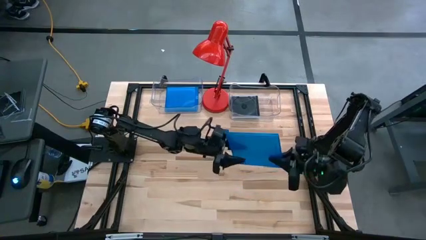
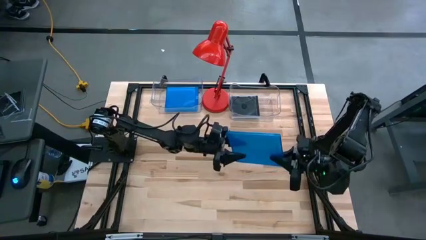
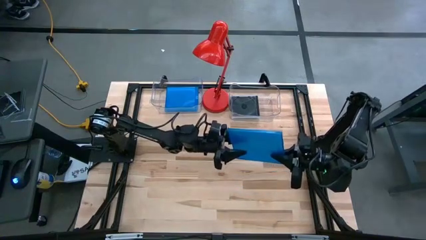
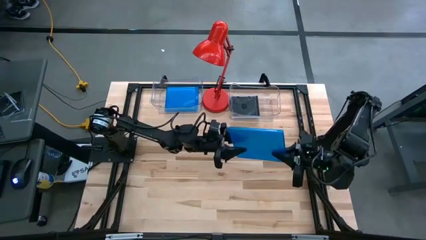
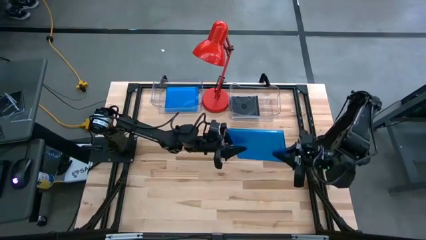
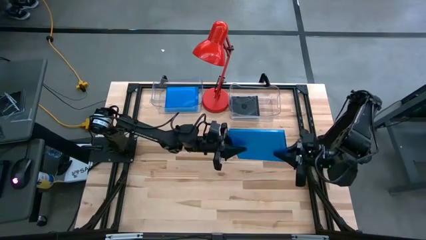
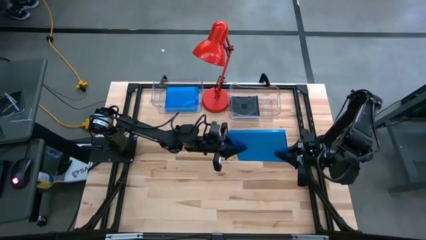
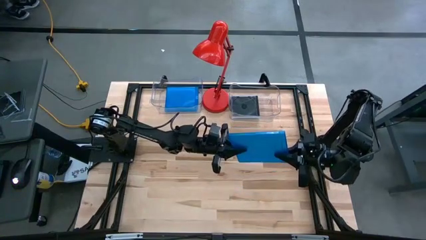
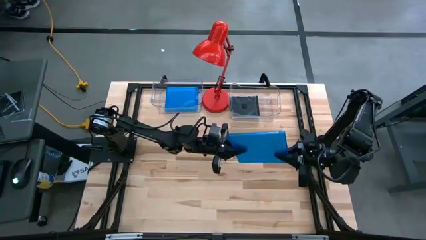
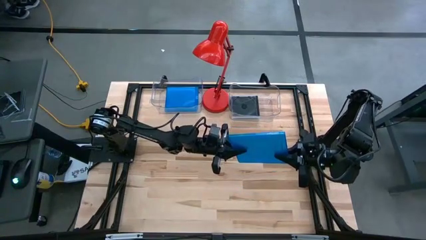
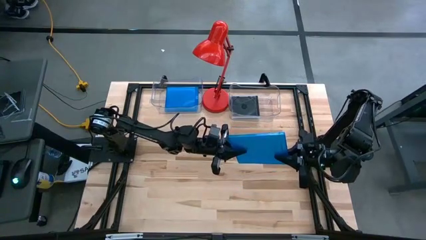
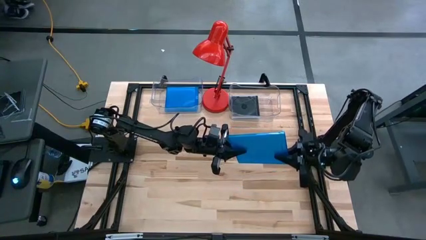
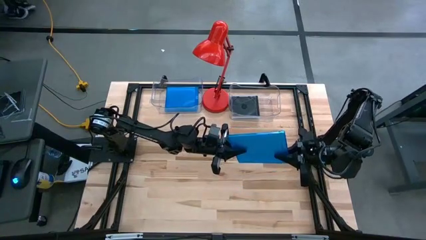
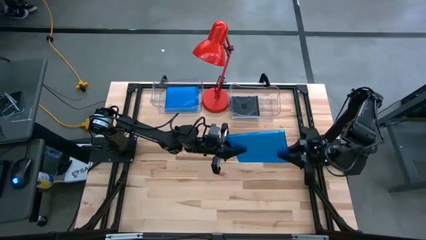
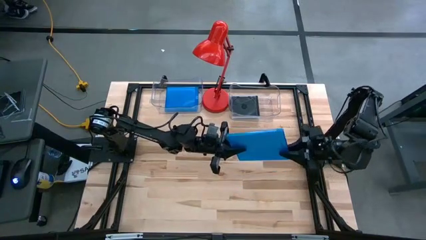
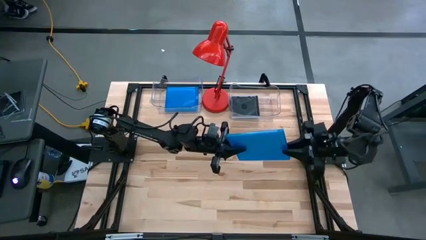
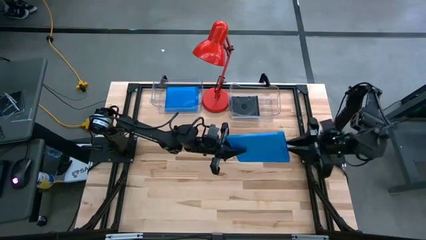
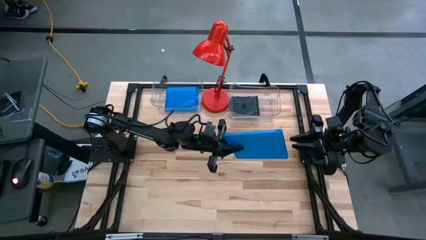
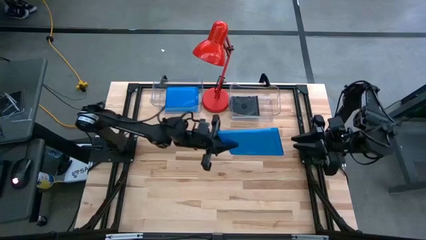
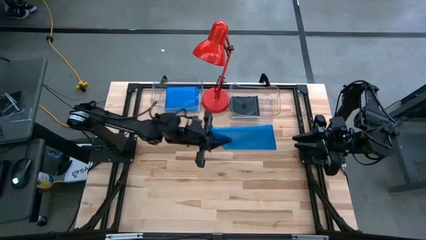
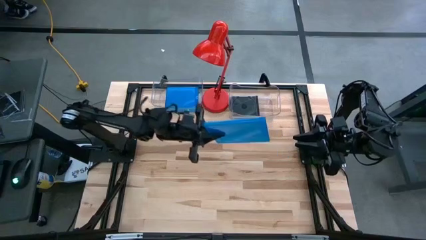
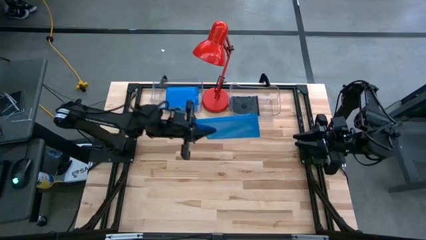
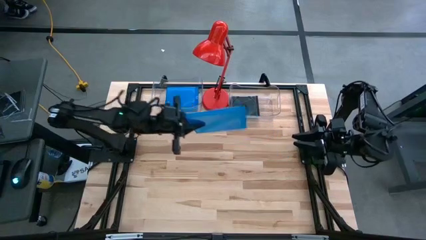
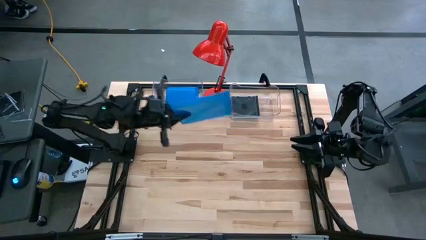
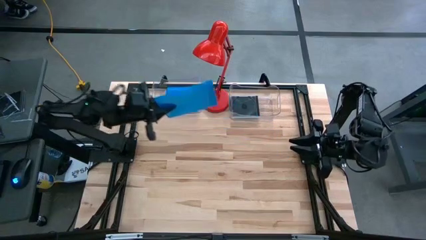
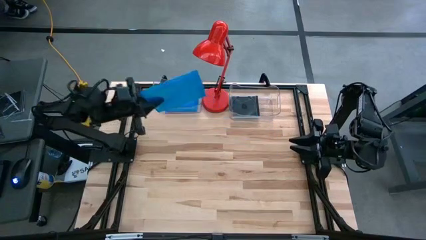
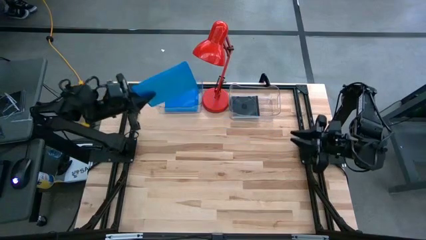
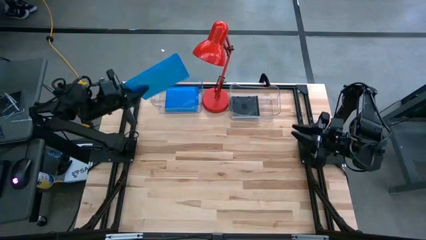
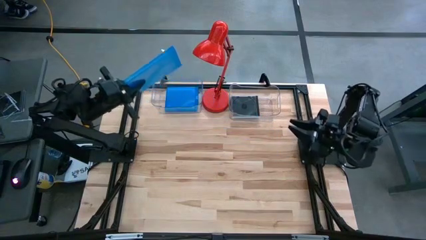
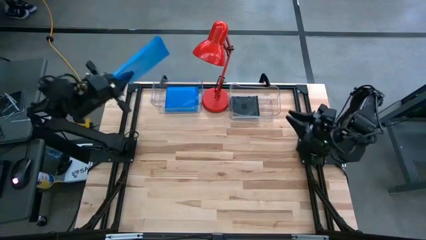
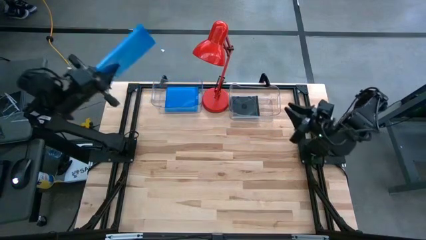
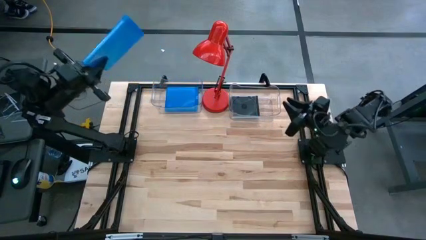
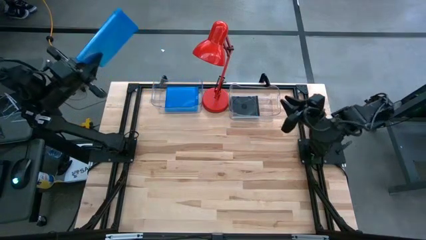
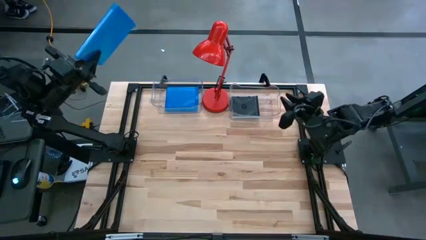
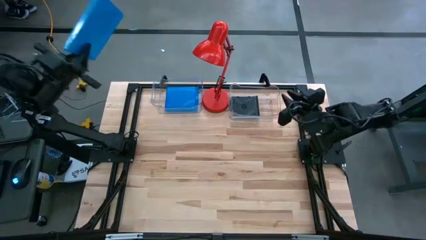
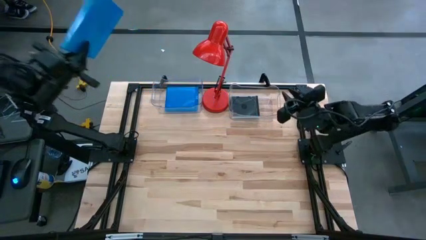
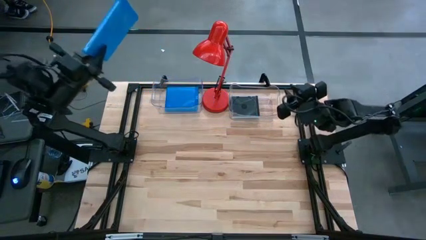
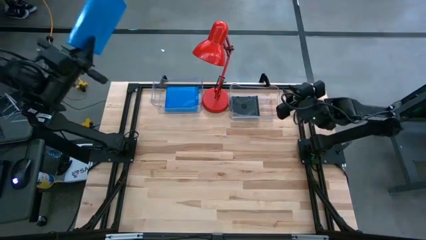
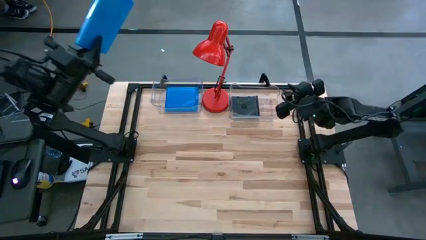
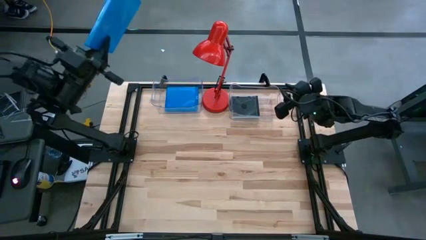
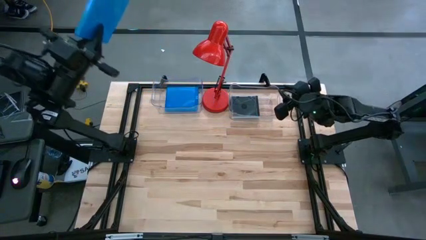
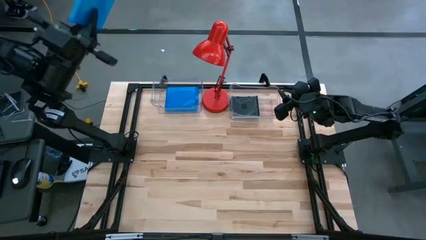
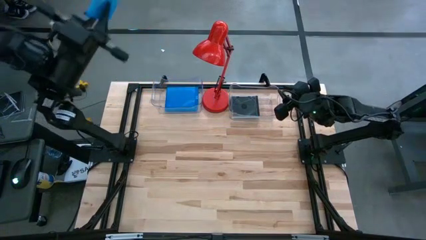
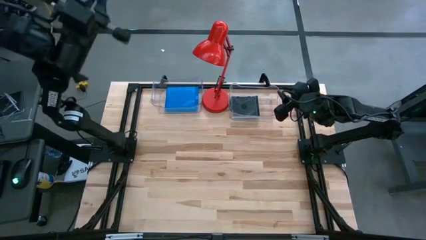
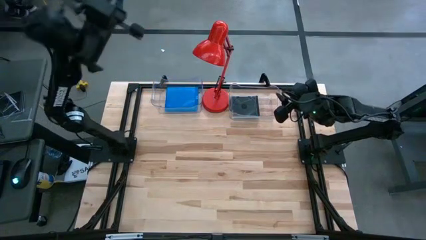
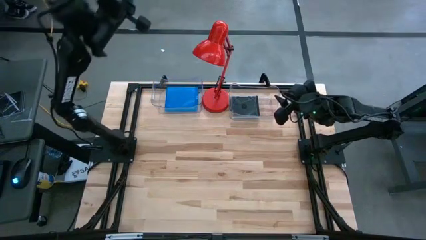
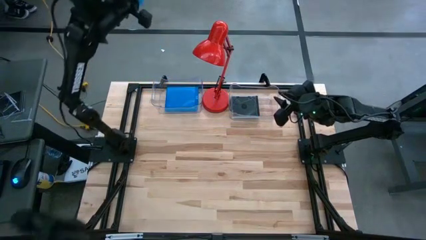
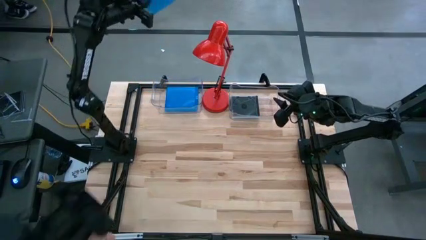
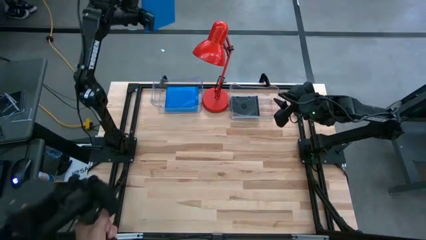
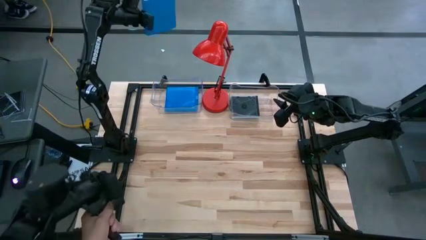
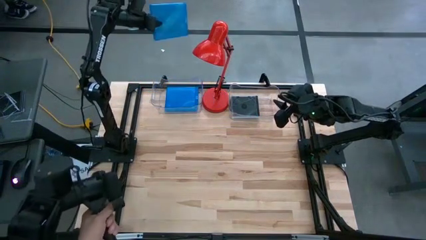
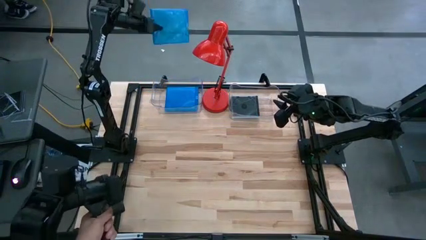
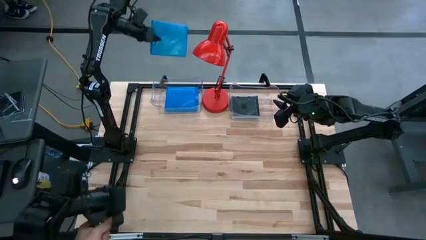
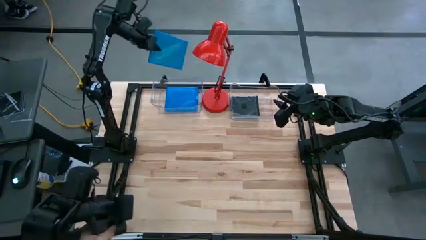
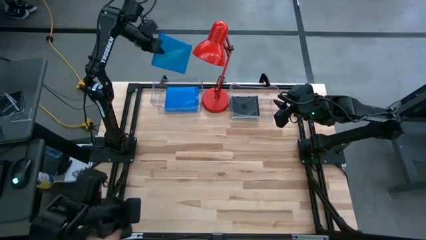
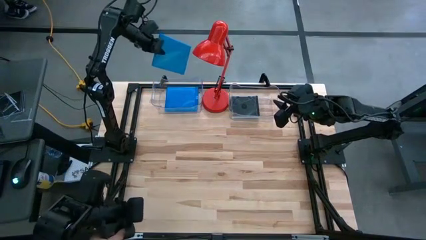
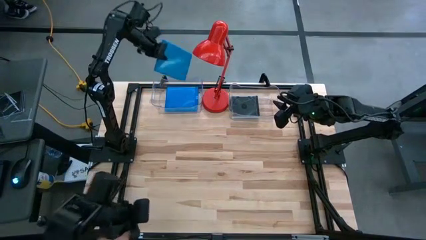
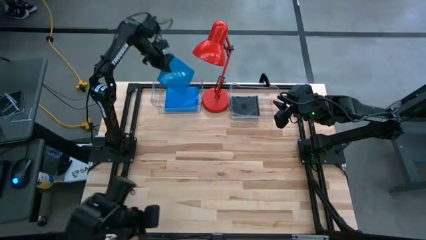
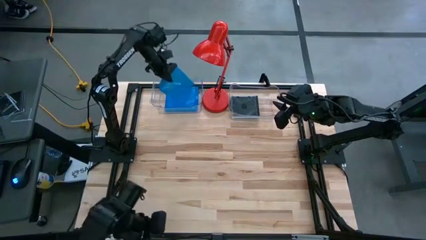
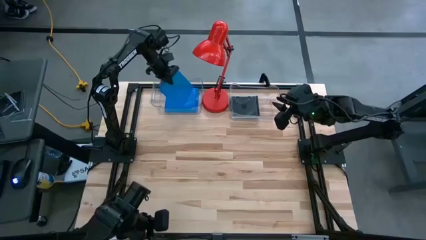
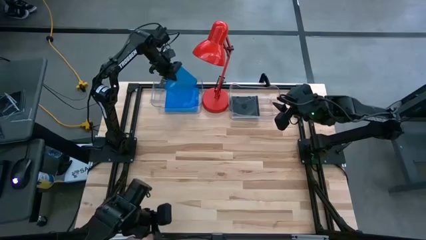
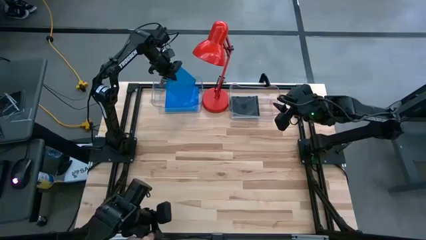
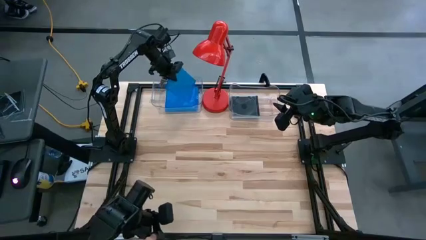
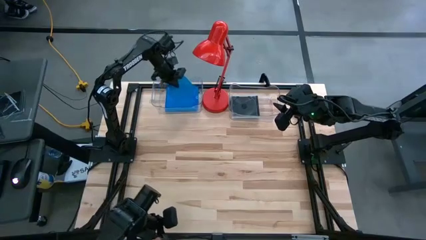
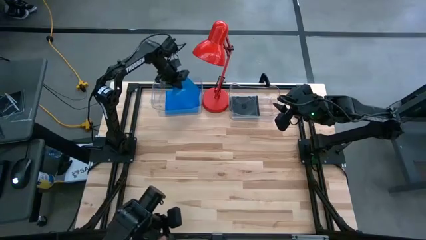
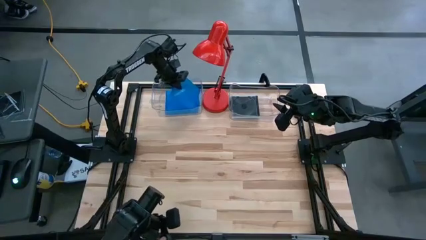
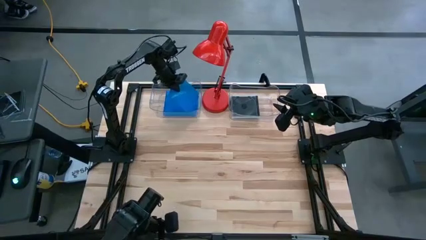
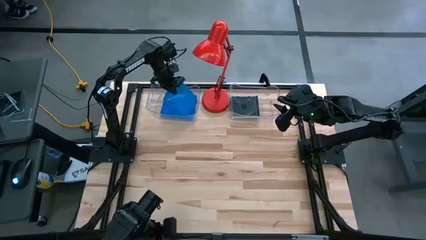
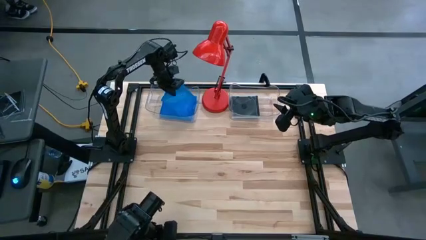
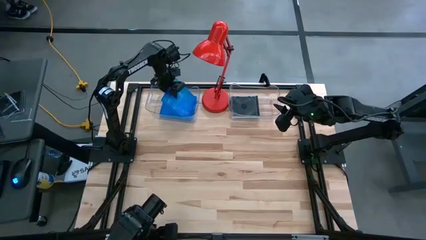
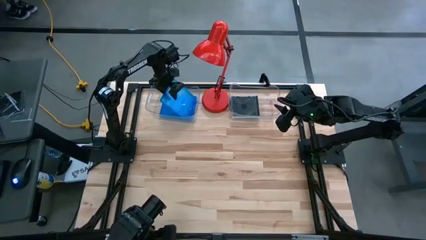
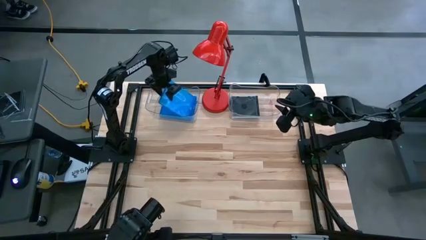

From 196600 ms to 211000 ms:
Task: Pick & place jewel cases by type
Put the blue cd case into the left transparent bin

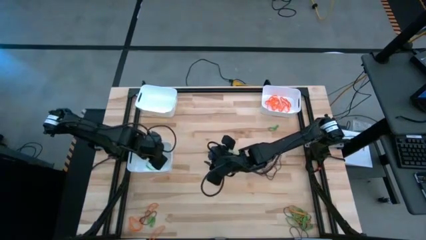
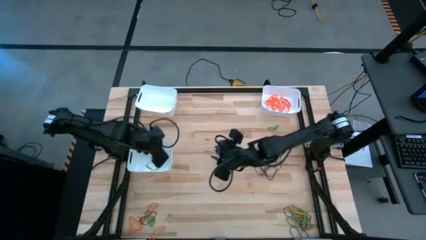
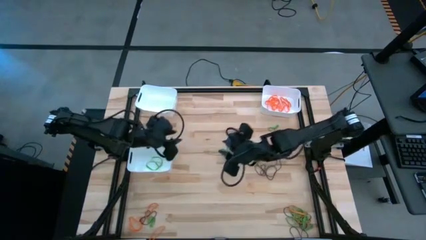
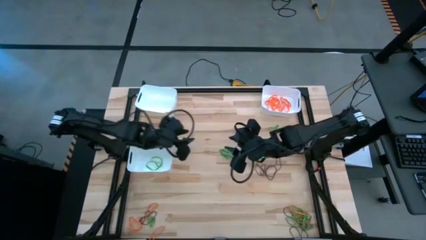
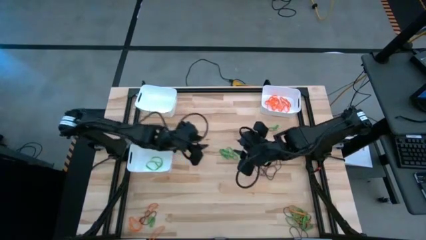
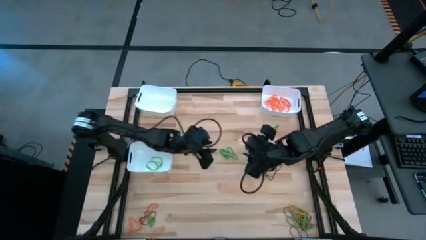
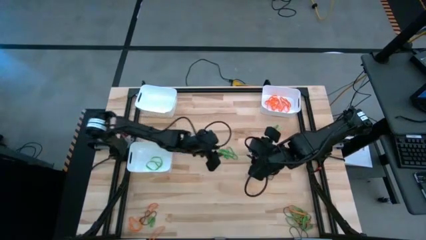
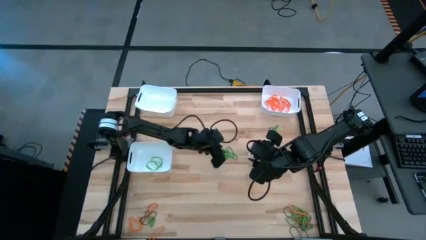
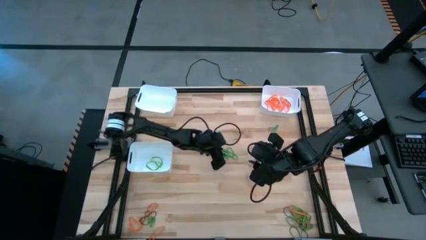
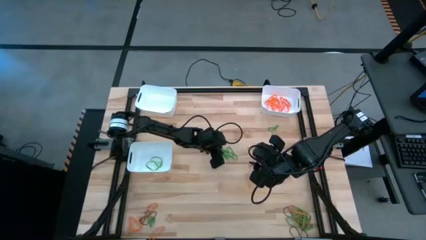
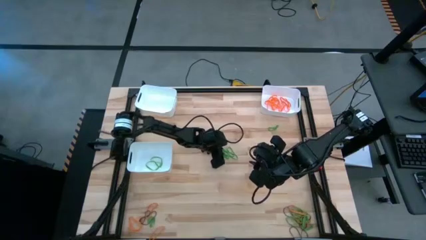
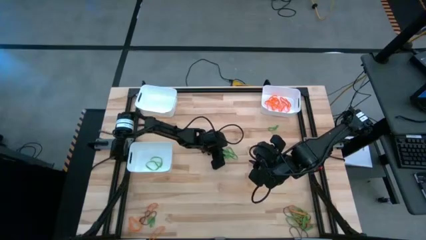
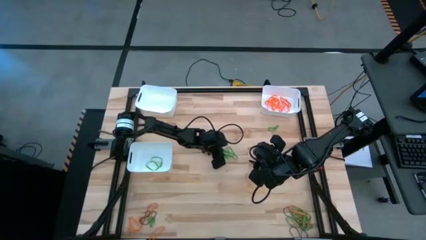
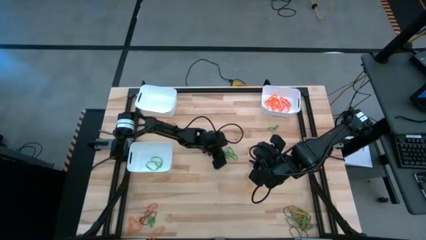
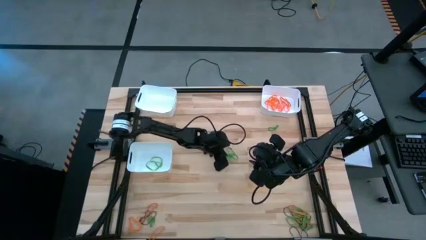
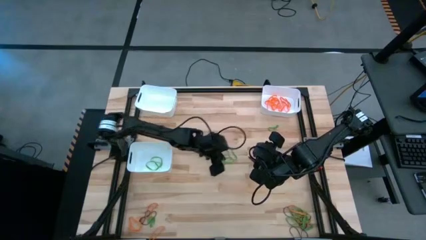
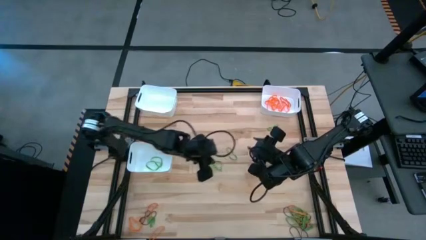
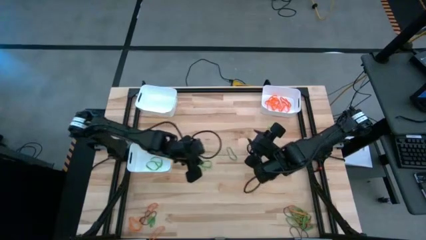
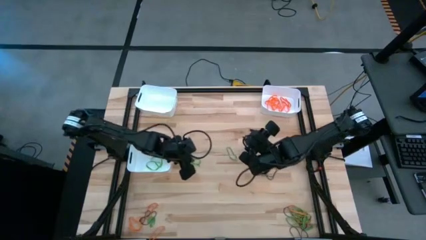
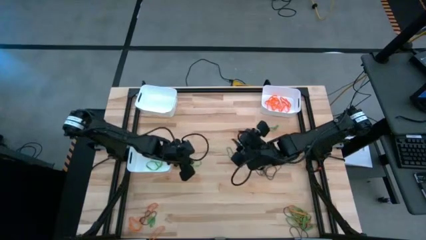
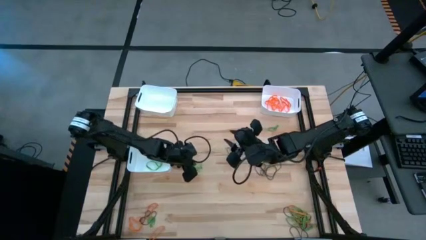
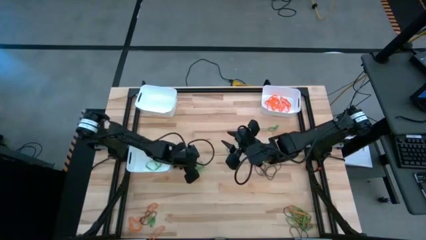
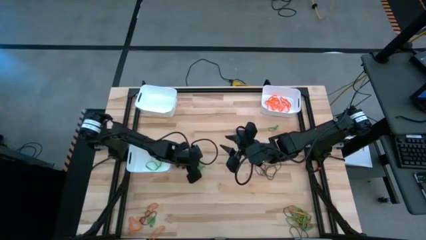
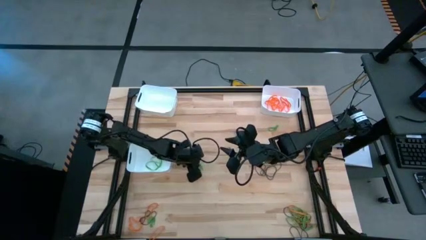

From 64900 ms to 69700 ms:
Task: Sort rubber bands into baskets
Put the green rubber band into the bottom white bin
